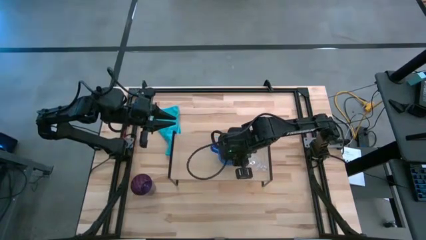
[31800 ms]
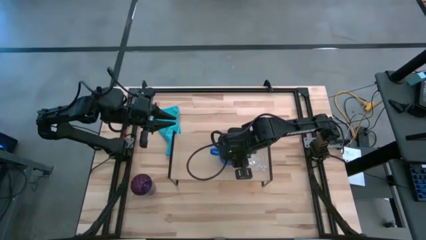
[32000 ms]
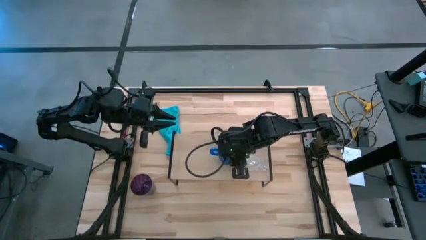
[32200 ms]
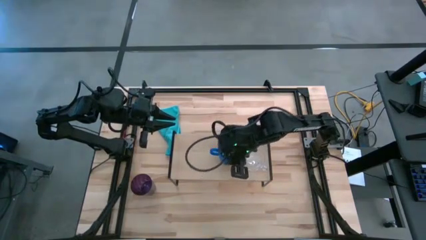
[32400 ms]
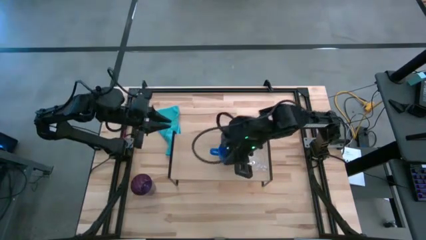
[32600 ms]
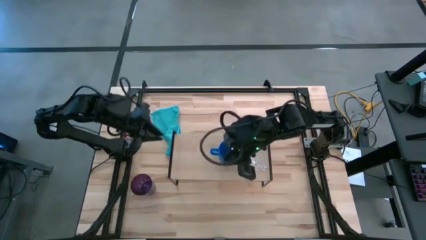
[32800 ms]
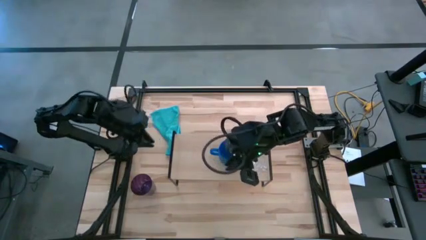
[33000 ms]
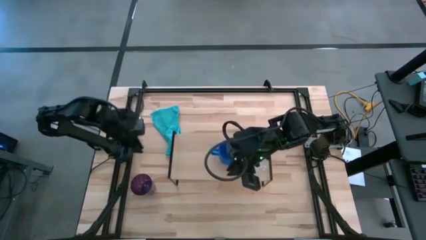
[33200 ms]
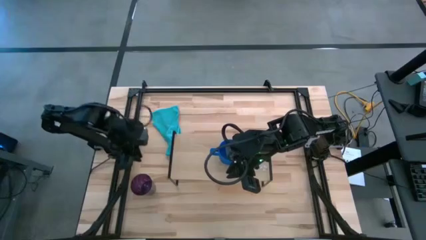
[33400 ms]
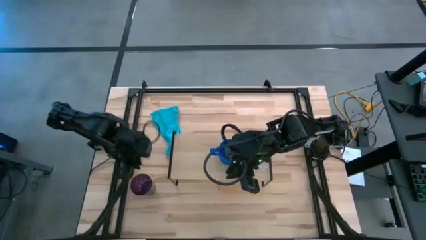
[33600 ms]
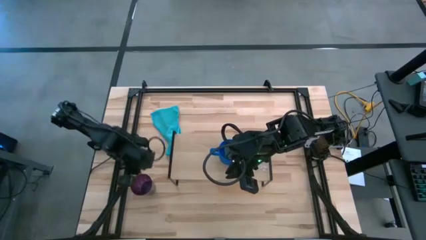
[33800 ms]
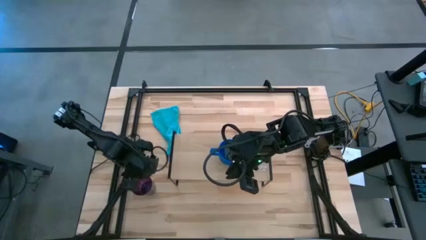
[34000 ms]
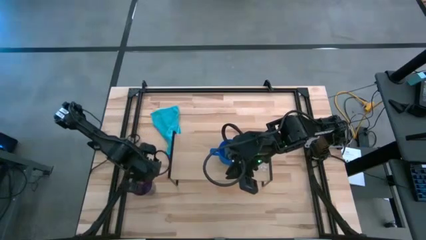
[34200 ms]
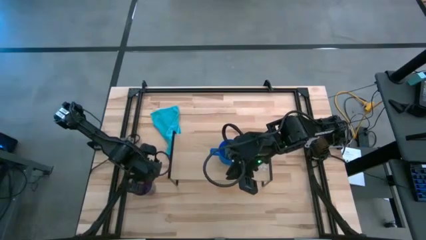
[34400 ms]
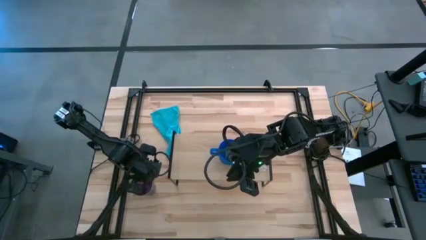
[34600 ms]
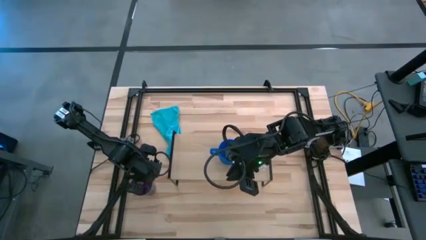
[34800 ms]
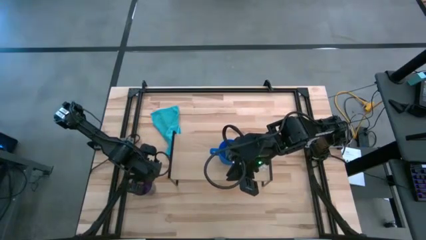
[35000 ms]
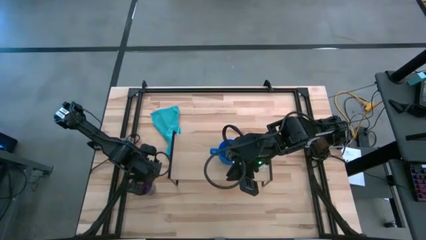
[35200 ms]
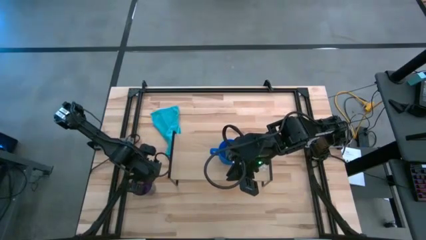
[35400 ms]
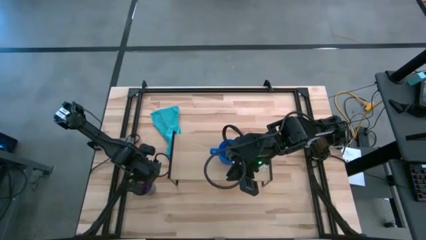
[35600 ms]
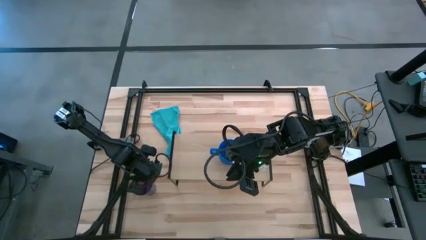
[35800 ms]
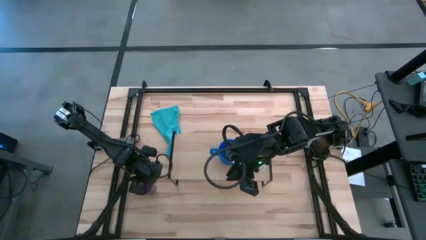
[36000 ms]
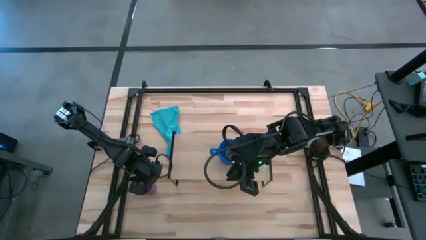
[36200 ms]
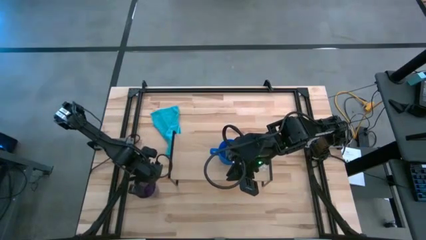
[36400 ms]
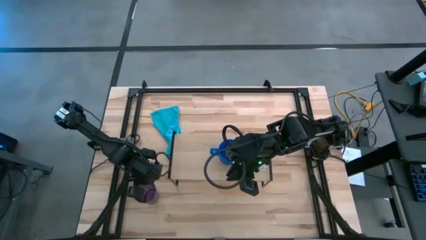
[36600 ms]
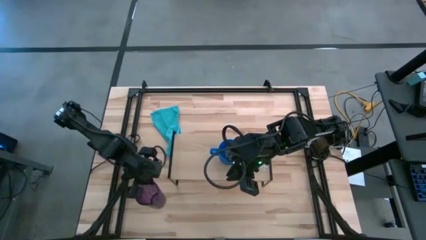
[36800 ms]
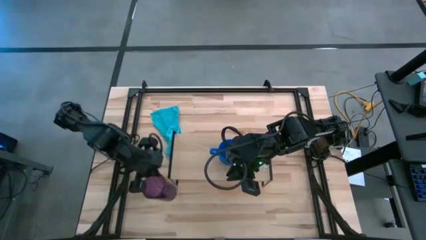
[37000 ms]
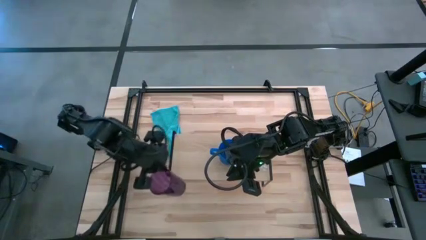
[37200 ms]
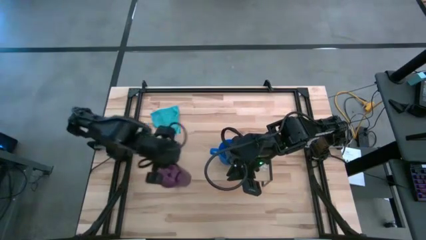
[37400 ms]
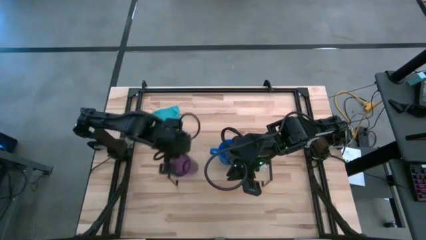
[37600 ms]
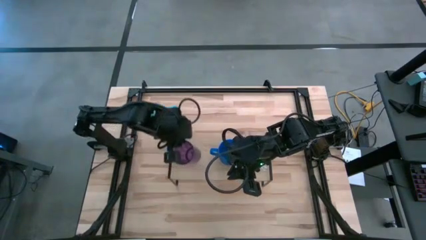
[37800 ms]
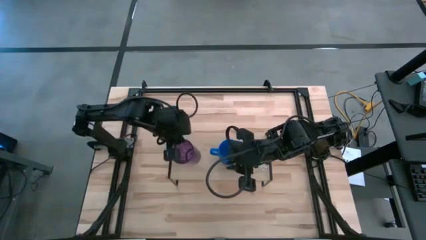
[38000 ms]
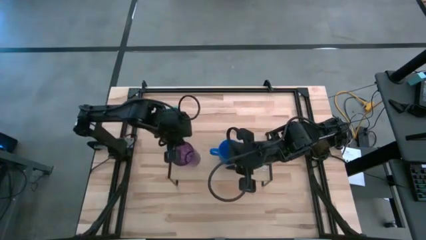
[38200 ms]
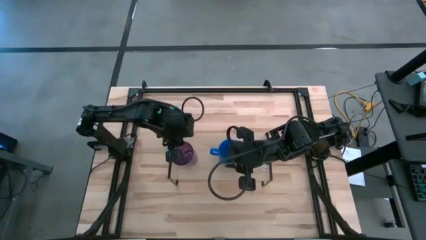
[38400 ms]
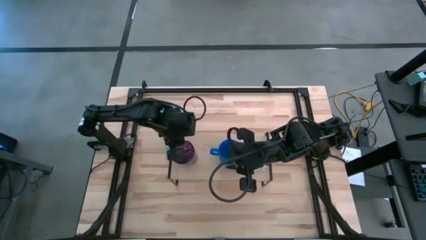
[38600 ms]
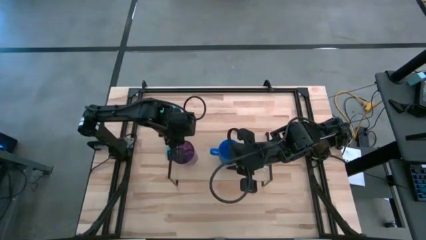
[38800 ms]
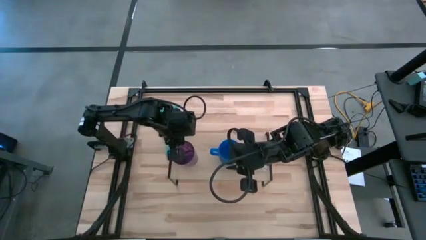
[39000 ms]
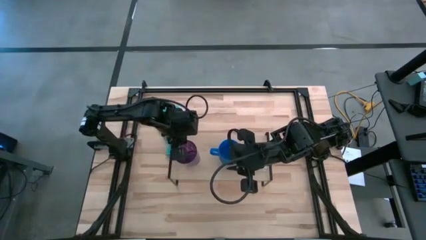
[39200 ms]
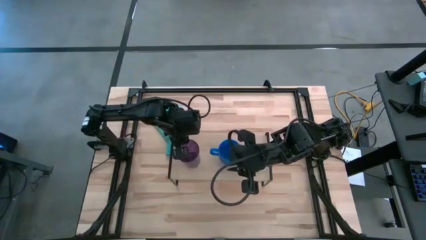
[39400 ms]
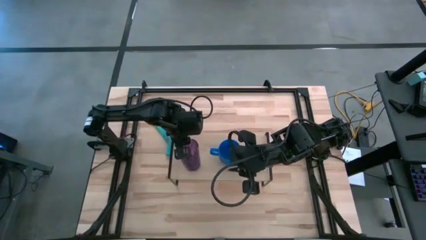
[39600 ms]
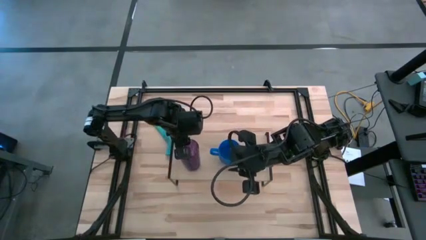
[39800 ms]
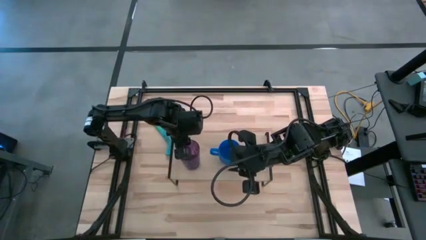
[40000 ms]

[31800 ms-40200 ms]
Task: Stack small to large cups/mugs on shelf
Put the purple glass on the shelf

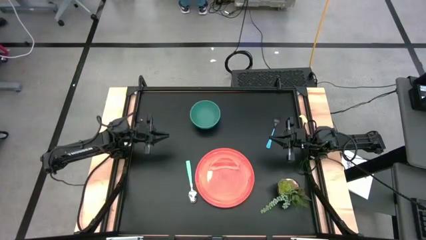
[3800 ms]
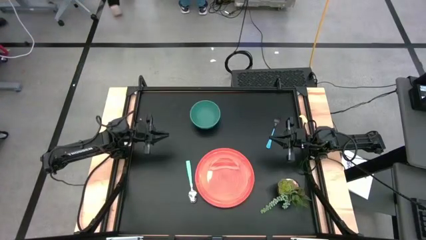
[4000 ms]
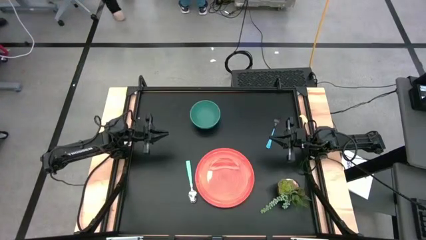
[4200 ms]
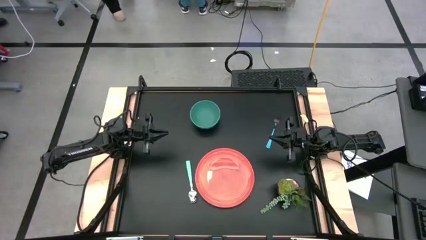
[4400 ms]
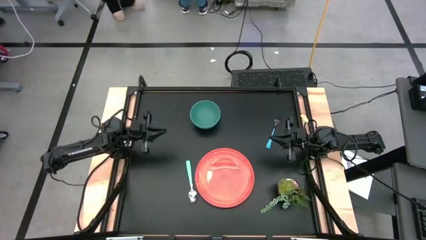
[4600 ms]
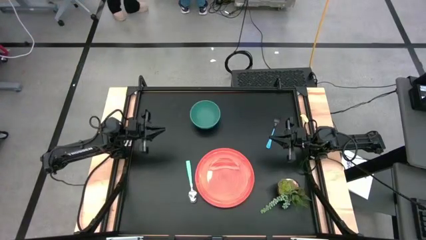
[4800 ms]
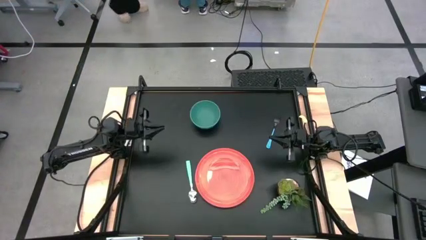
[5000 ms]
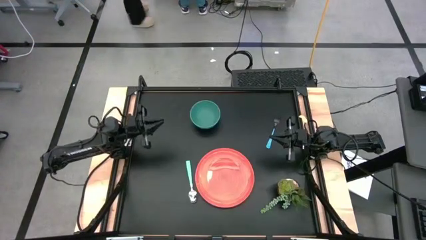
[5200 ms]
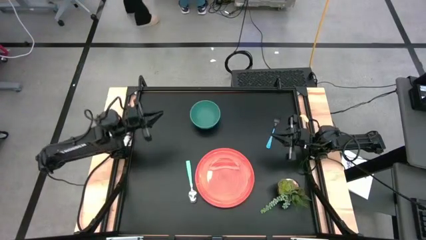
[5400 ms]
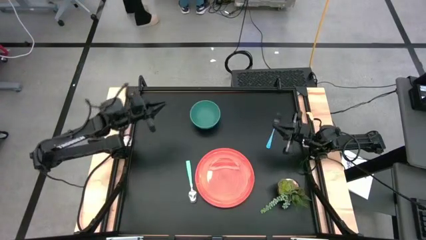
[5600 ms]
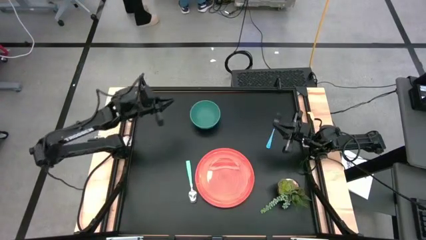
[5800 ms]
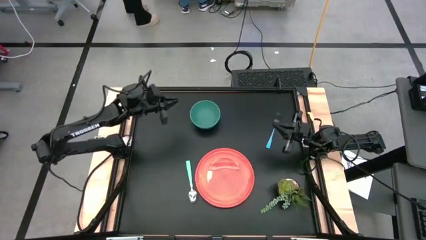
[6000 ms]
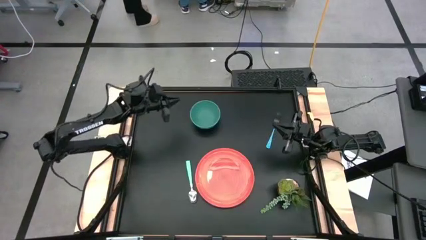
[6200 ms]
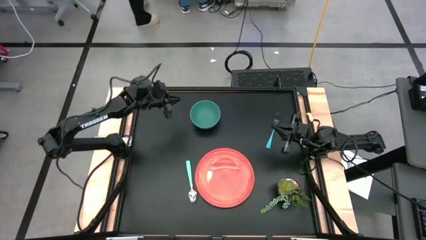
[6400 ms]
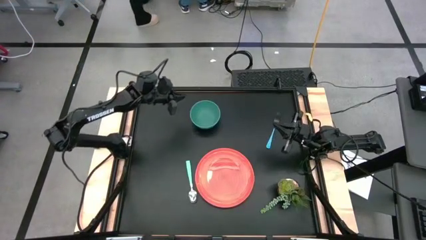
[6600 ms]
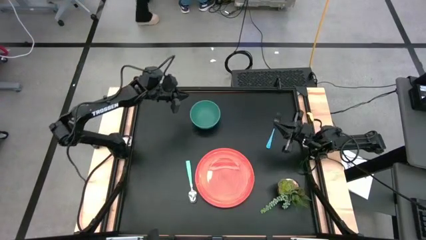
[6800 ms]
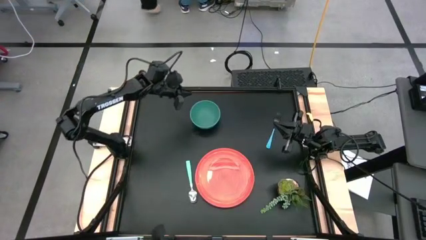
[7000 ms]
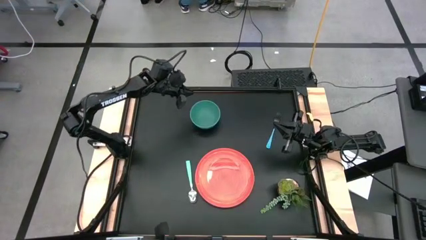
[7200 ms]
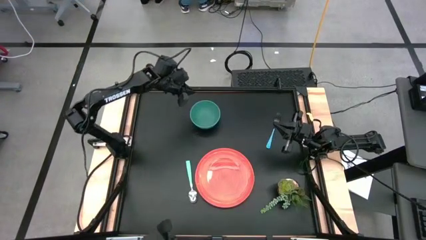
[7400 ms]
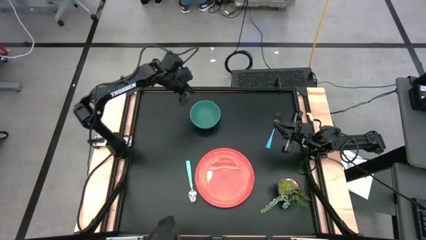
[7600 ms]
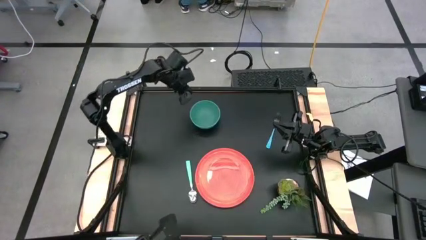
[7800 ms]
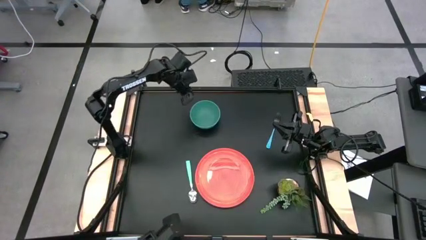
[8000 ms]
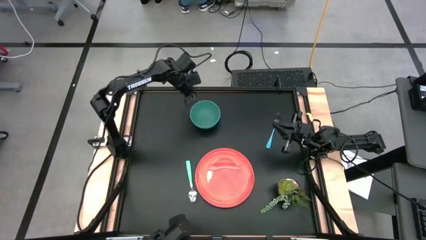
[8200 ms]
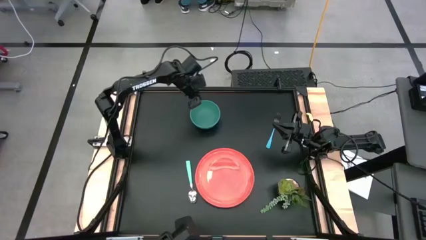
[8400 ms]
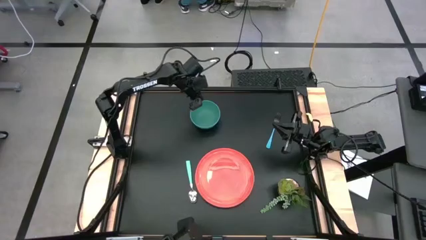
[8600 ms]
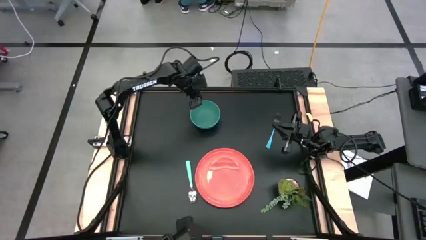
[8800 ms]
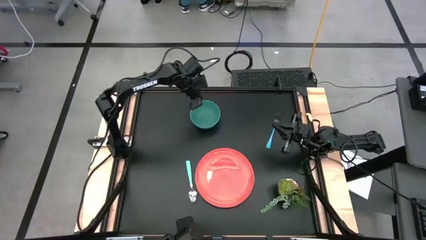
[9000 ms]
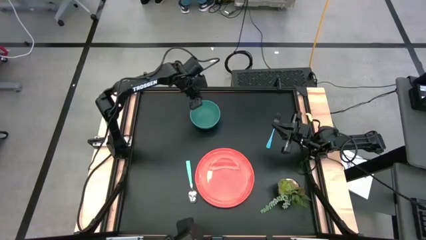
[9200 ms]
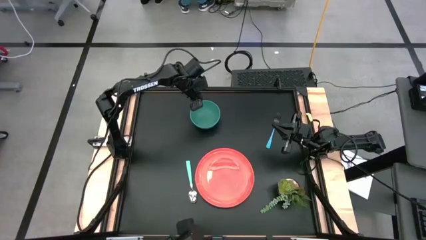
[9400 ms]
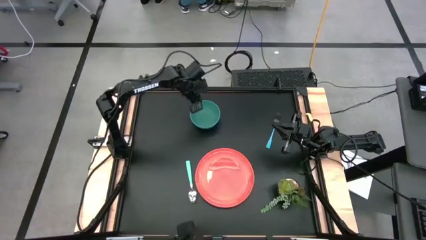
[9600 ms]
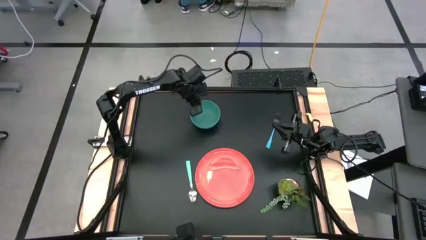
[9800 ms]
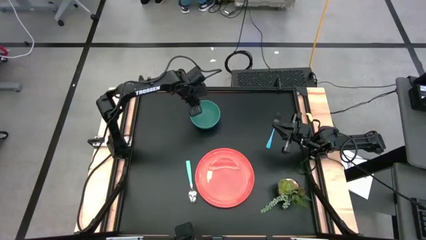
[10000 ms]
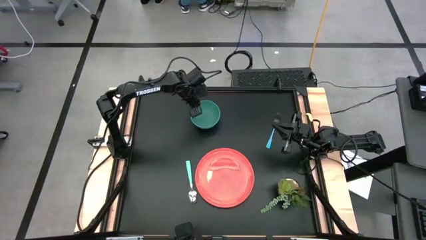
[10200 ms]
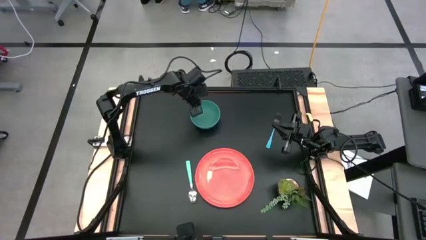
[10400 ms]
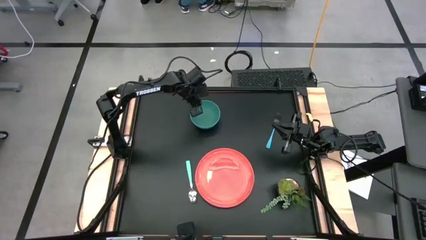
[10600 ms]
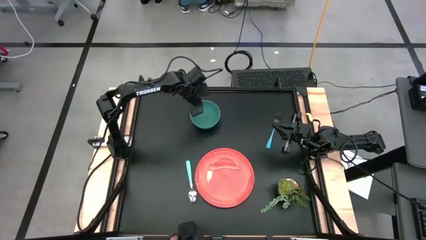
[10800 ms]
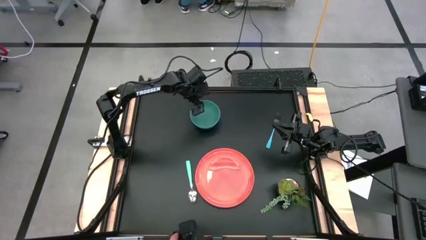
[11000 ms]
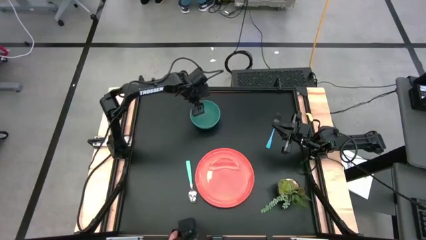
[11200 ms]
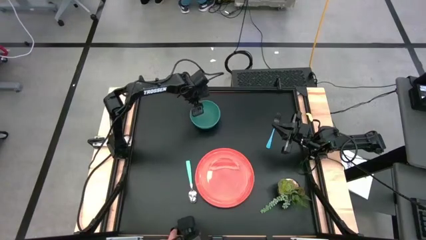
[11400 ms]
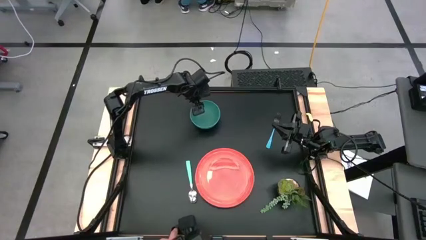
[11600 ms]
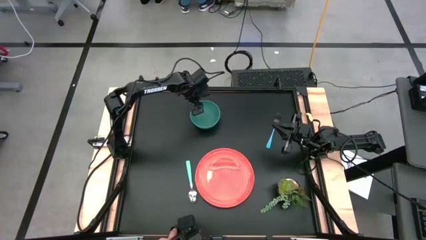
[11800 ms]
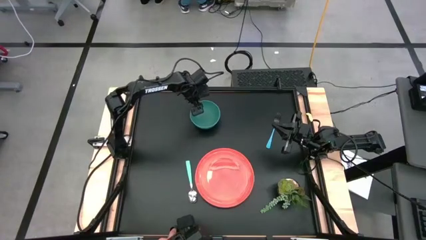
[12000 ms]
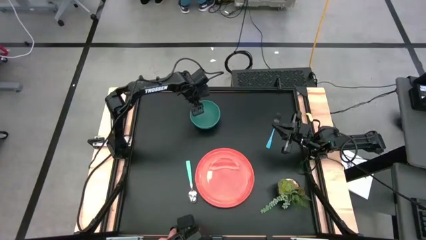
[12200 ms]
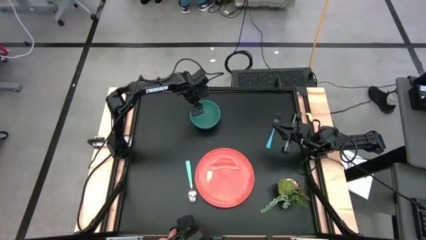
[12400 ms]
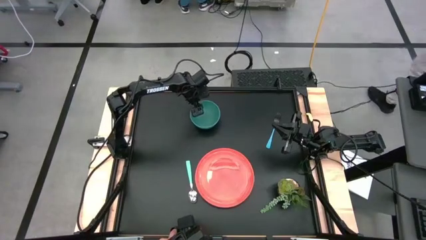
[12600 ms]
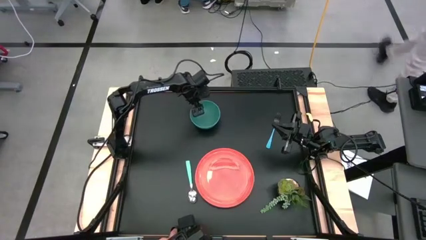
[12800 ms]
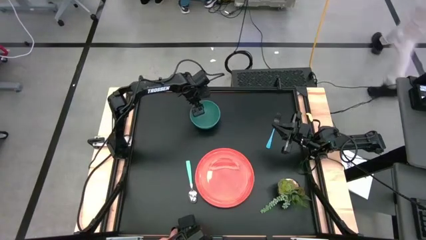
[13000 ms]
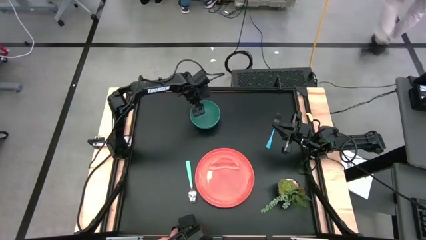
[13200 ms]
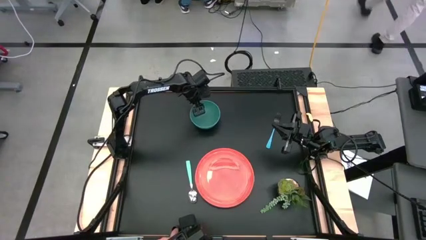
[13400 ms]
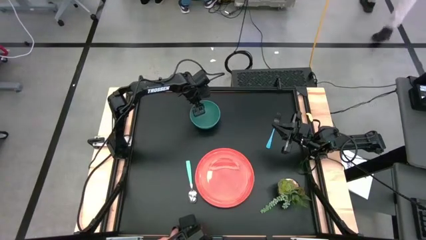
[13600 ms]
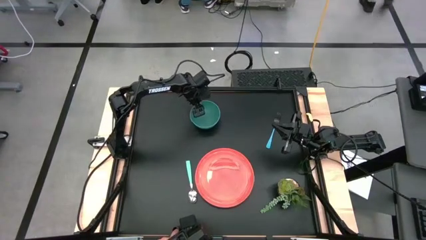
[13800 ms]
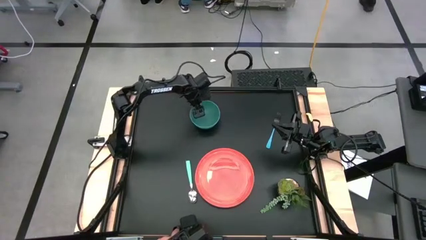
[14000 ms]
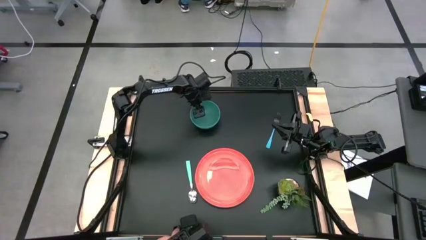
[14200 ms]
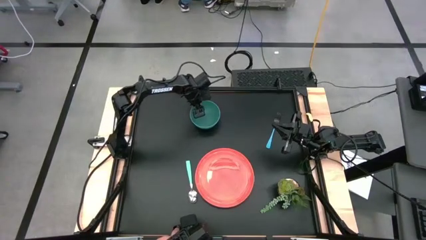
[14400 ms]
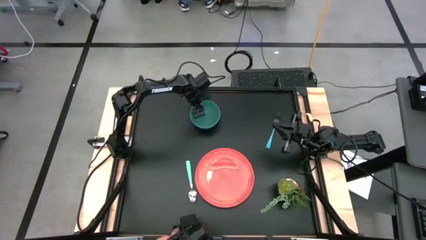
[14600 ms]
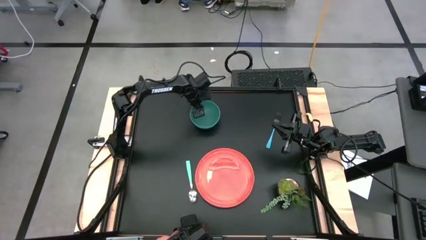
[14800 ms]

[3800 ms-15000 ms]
Task: Set table place
Put the green bowl on the orange plate
